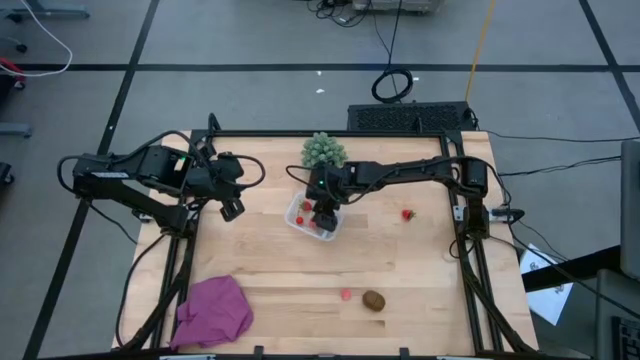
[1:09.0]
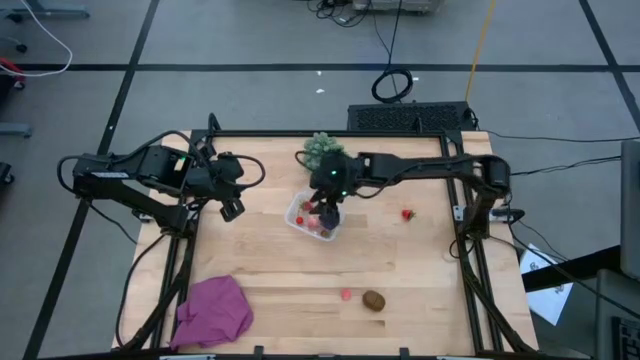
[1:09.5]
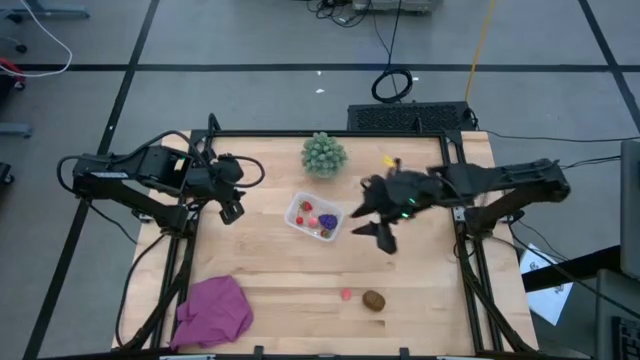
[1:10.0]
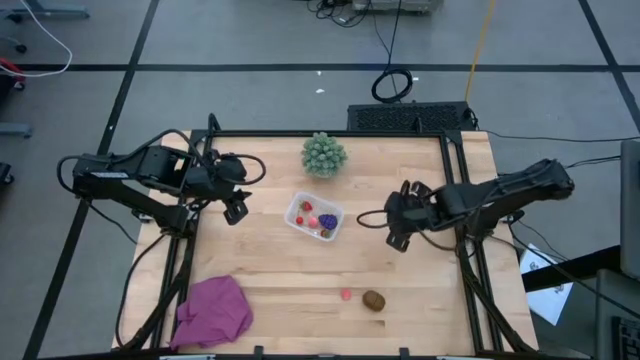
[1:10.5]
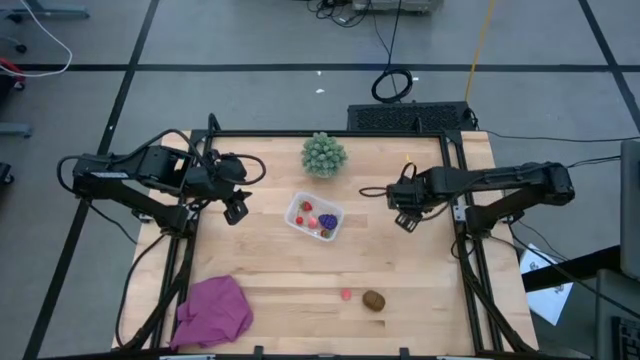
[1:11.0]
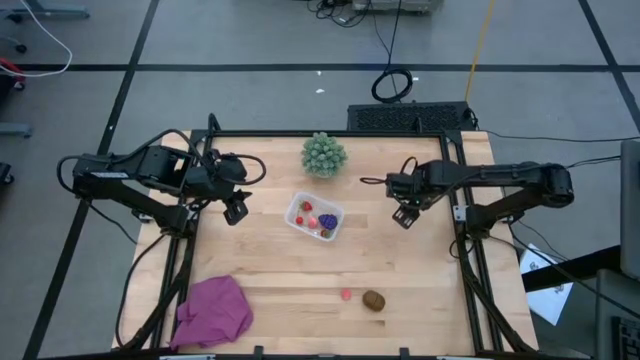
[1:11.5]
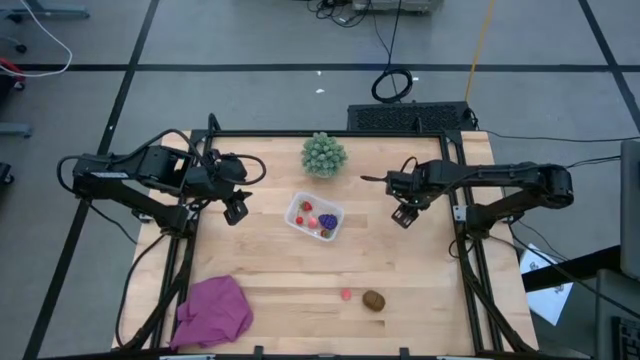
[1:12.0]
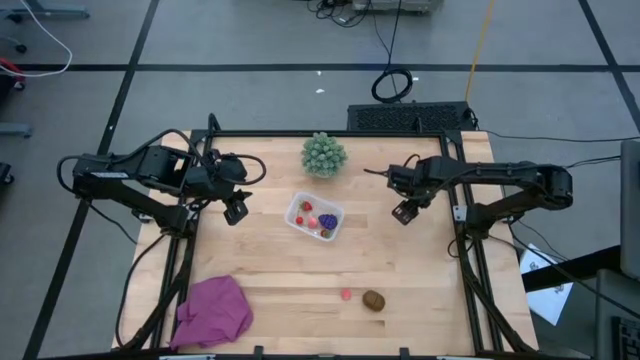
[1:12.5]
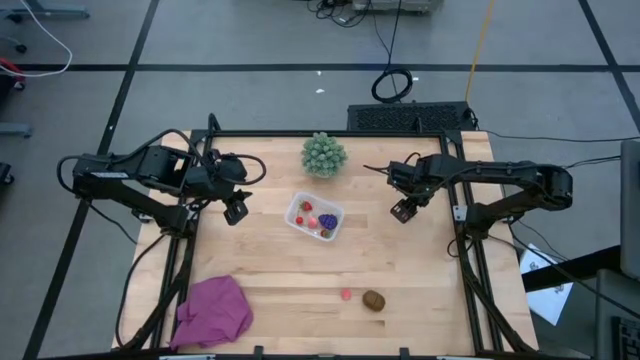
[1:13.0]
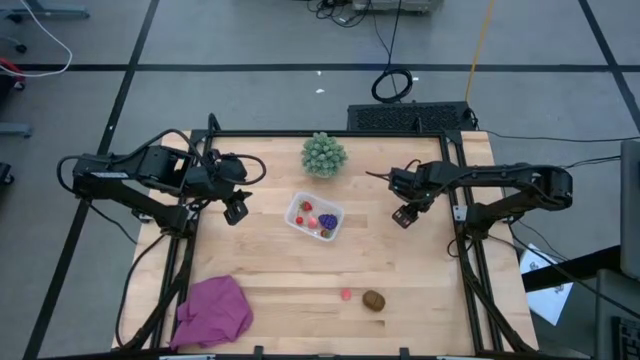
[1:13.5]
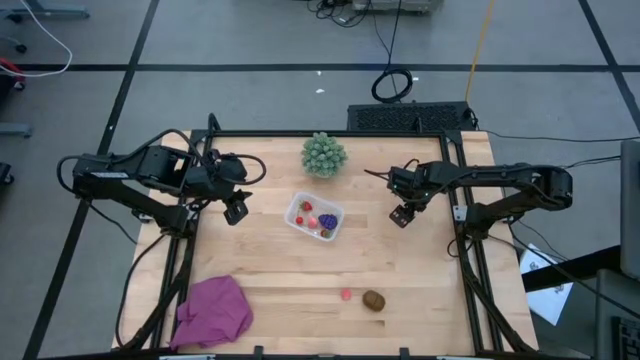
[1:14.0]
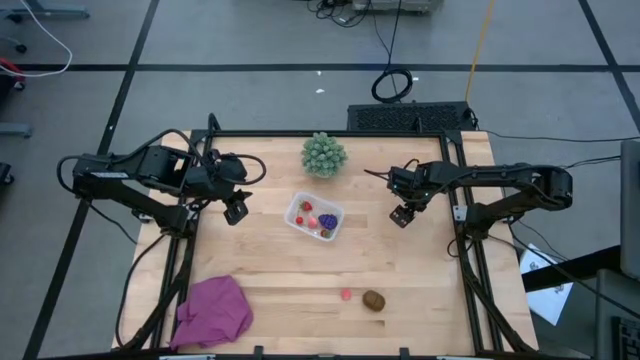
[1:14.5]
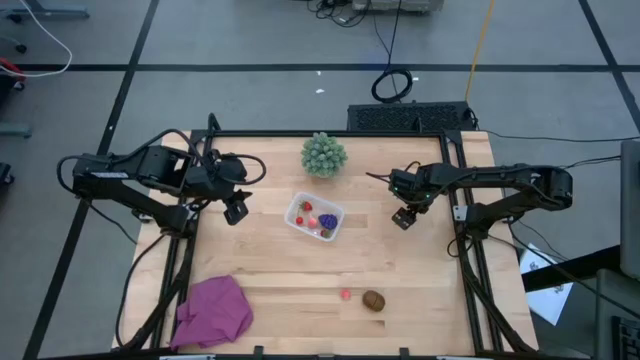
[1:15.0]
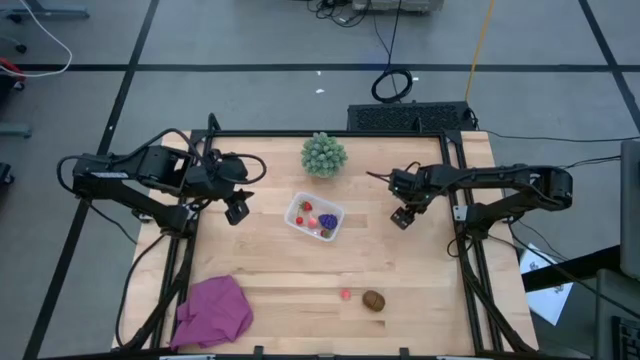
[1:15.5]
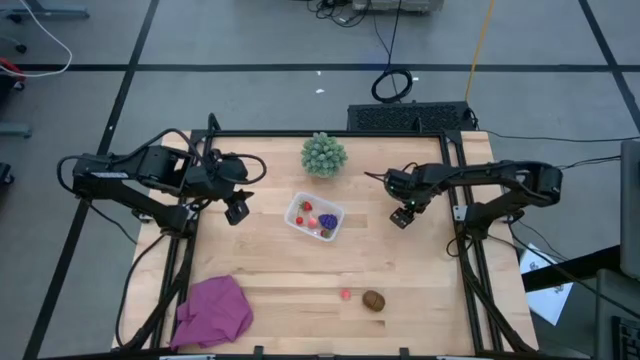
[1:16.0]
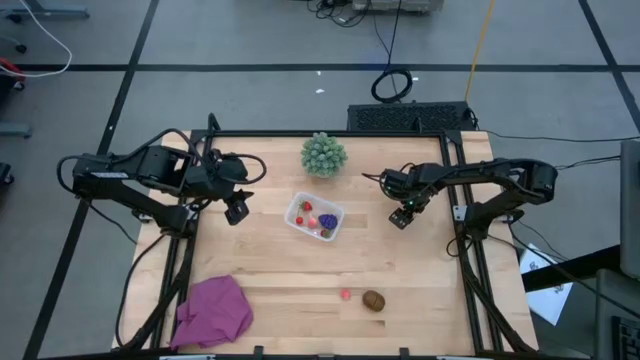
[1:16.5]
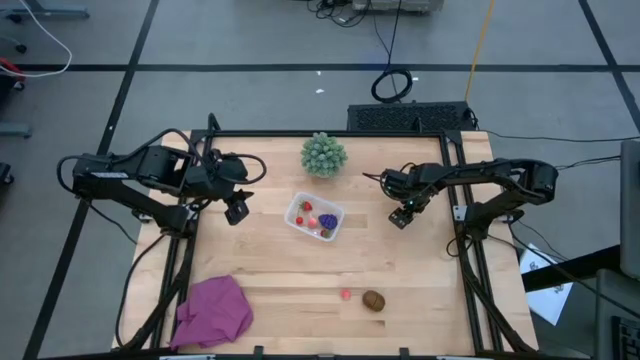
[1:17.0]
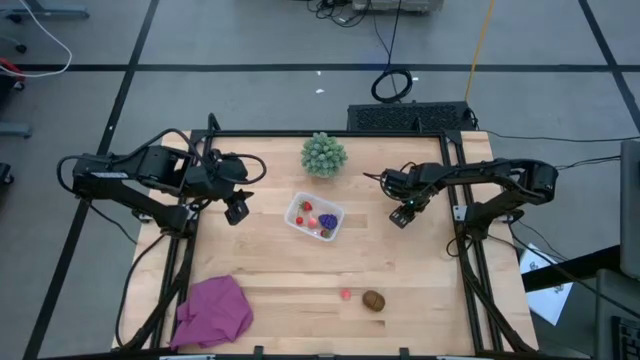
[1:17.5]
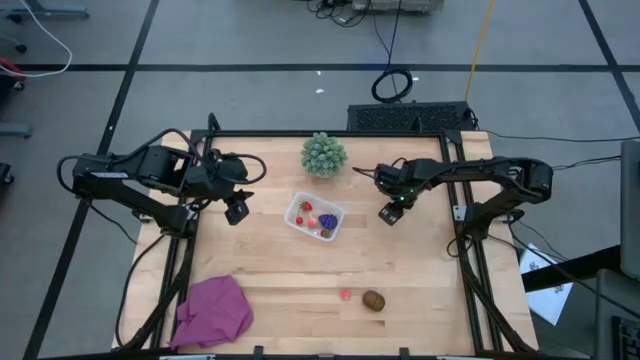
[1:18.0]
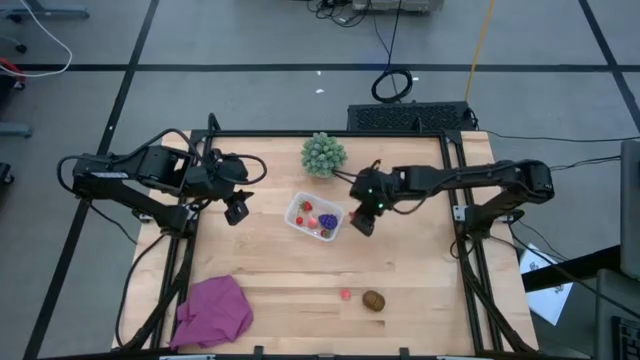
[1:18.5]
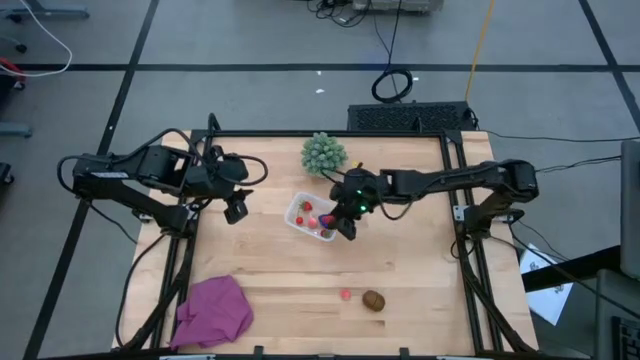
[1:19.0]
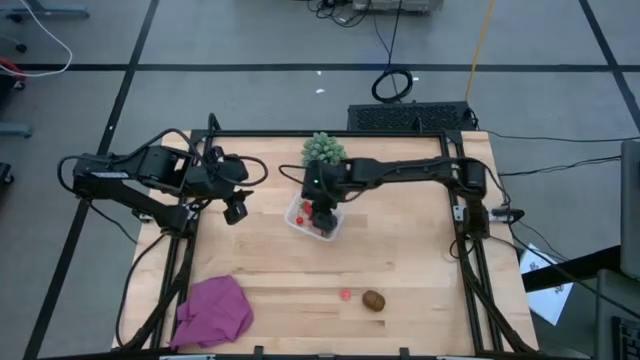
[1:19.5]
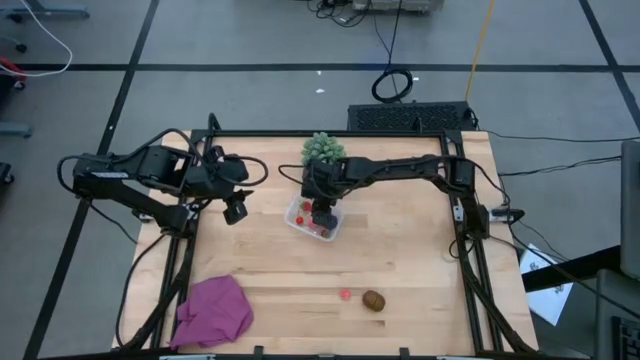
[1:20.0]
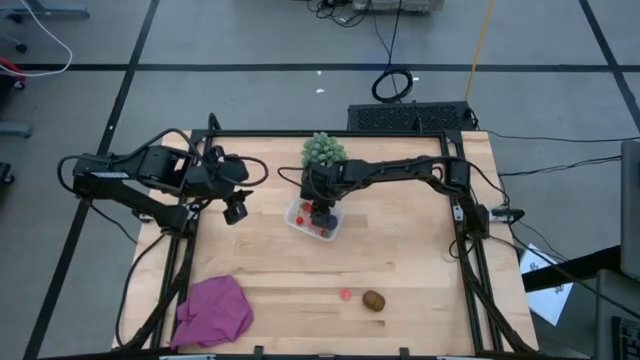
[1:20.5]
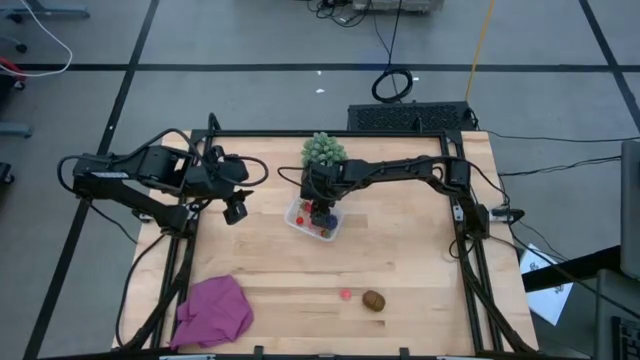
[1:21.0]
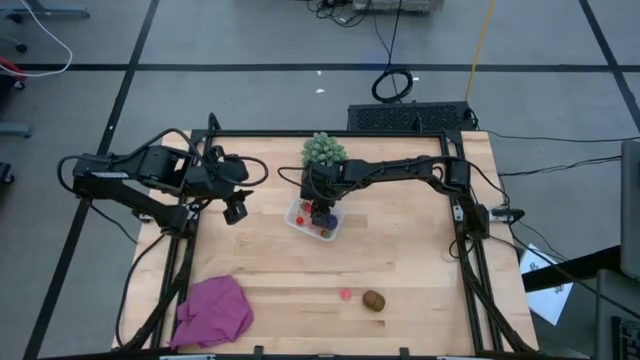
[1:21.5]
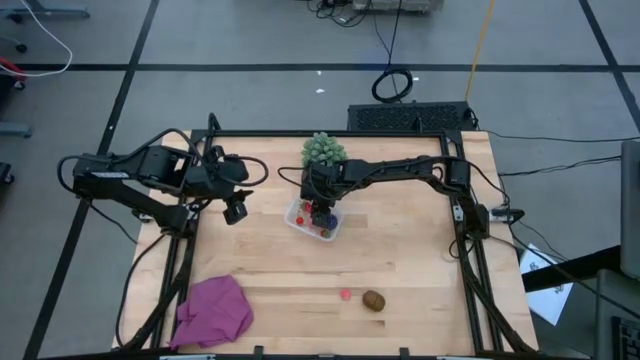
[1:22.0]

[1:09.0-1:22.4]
Task: Pick and placing Produce into tupperware
Put the strawberry into the transparent bin

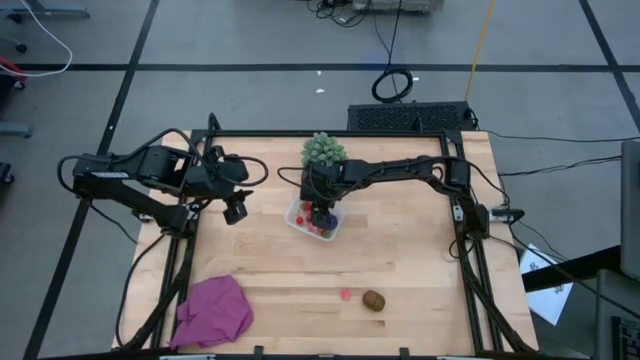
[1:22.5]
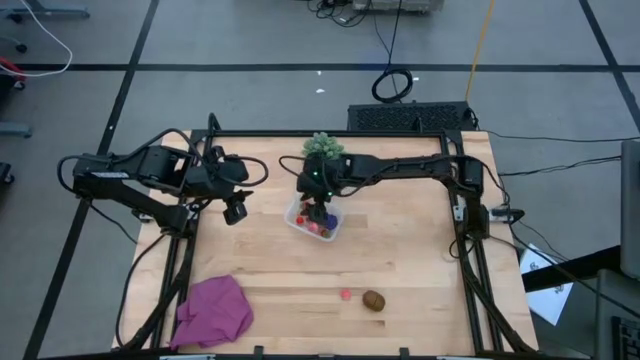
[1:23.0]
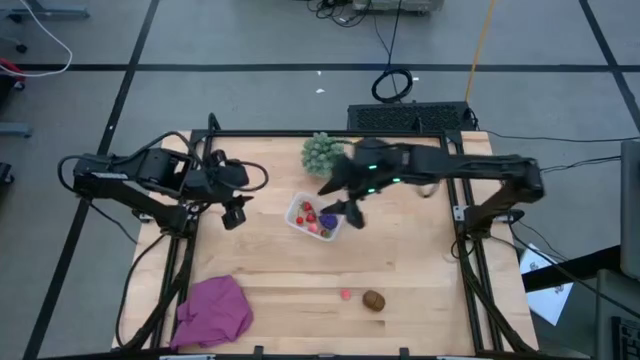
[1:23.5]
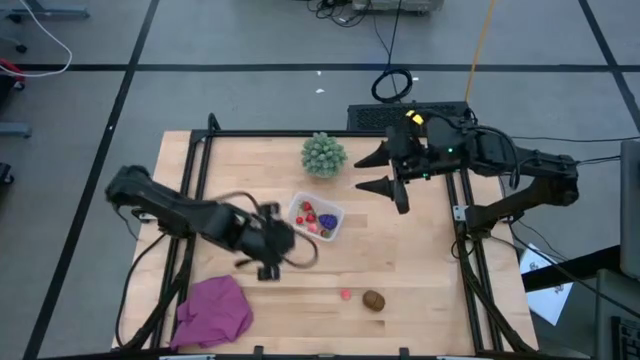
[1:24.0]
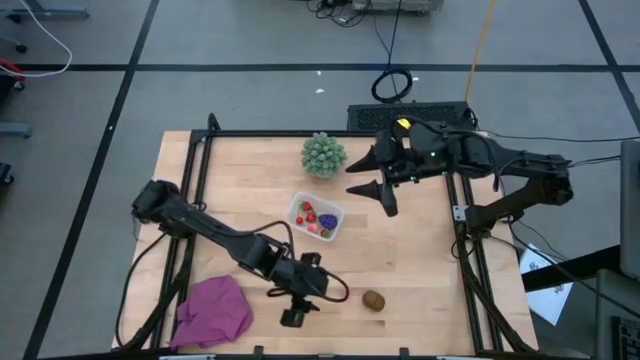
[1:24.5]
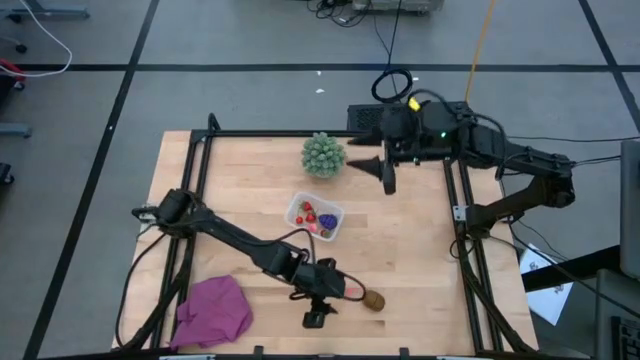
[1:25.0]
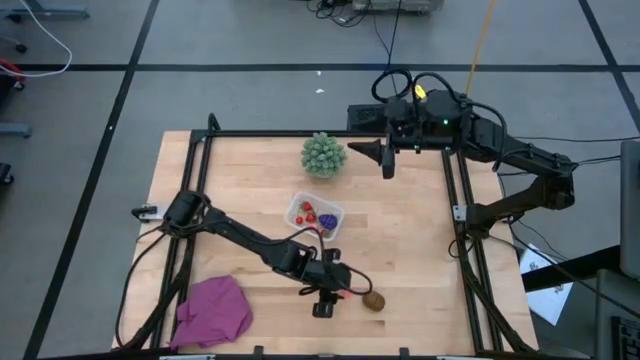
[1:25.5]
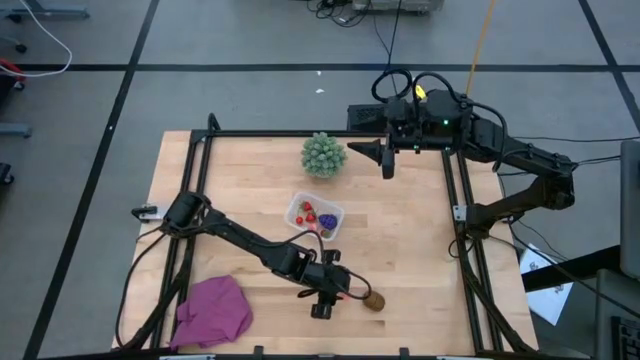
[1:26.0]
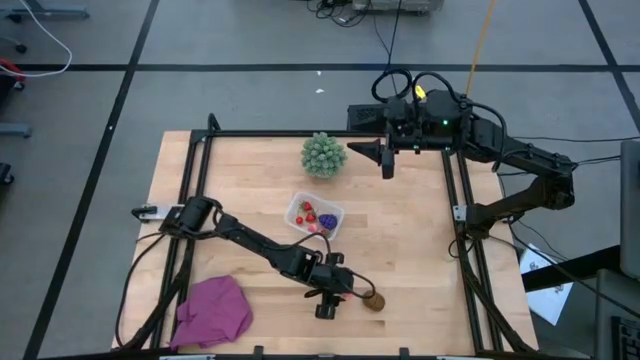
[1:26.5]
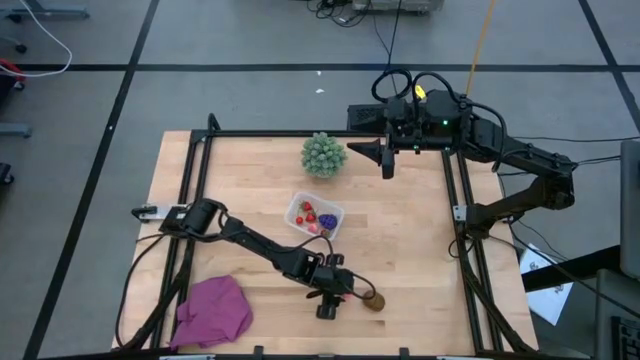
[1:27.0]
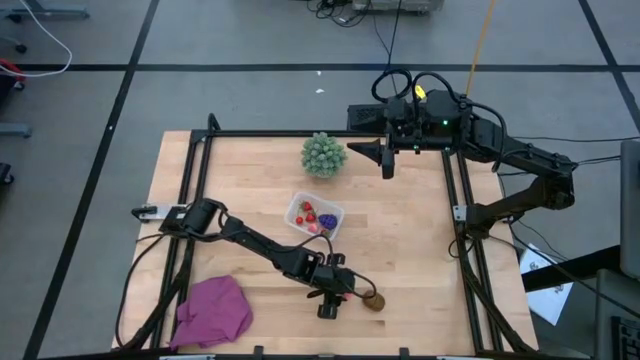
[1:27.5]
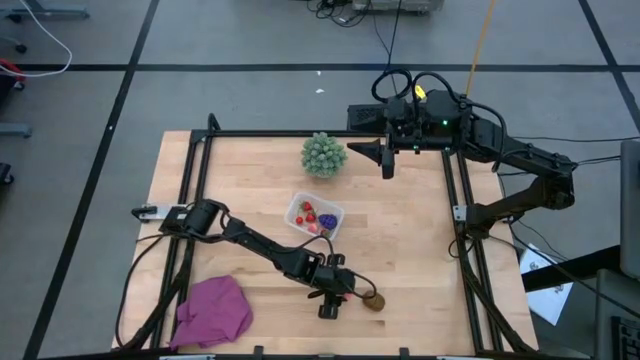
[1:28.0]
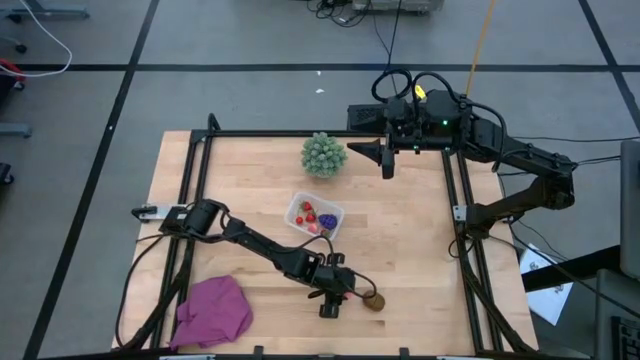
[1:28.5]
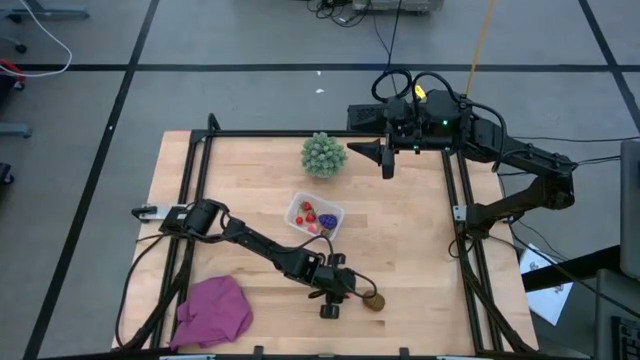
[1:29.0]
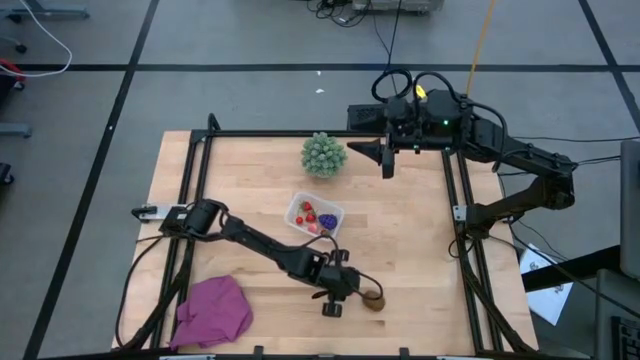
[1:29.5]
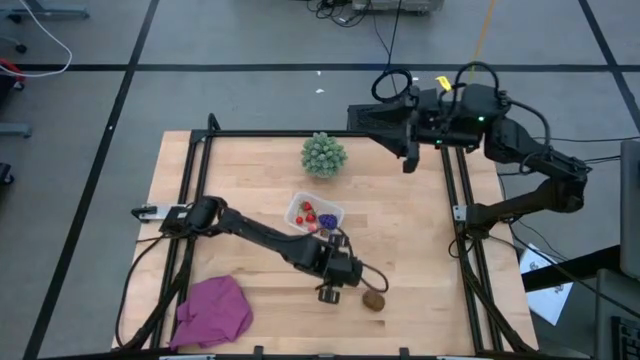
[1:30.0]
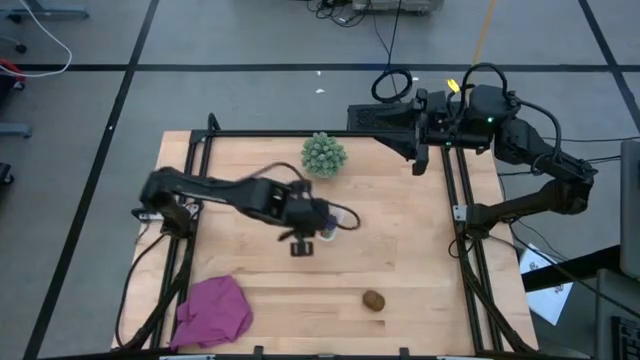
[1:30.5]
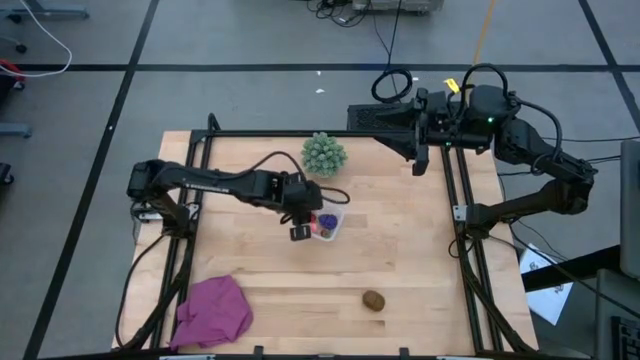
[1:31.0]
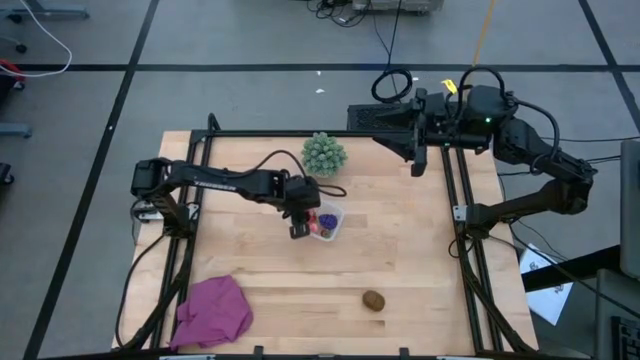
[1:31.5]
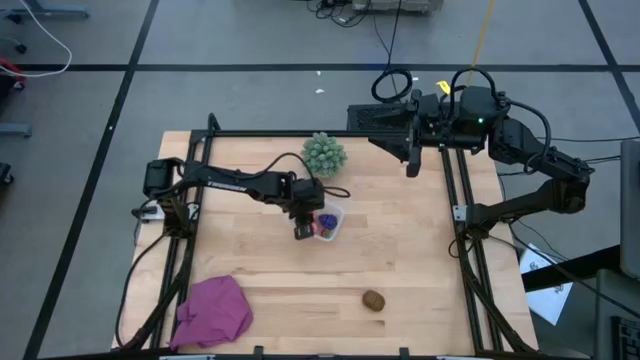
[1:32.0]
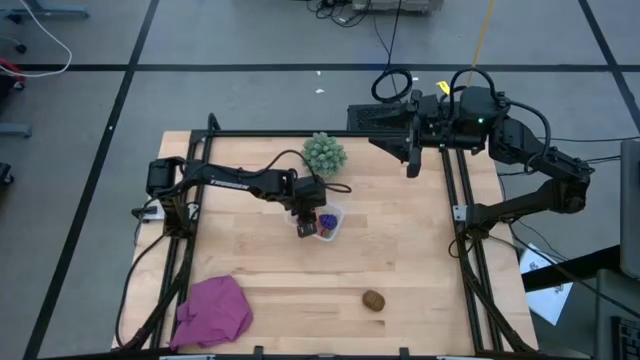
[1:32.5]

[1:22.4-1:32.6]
Put the apricot into the transparent bin
